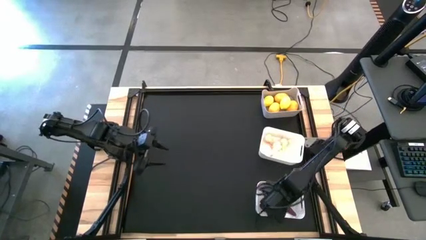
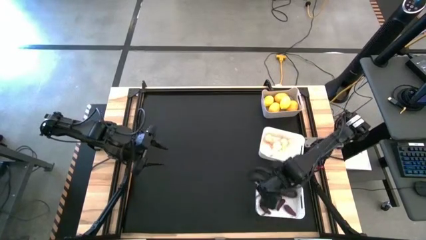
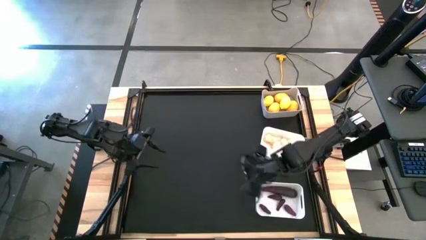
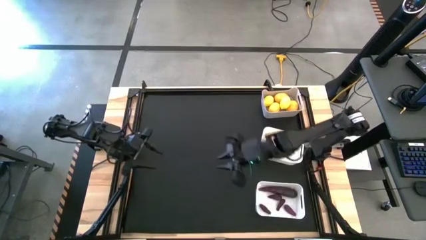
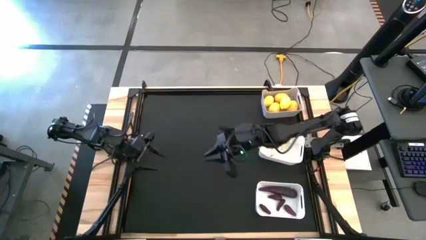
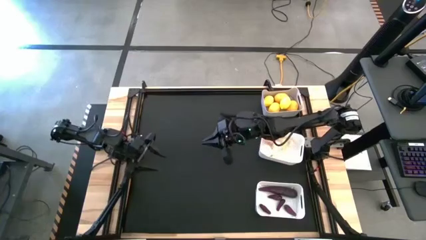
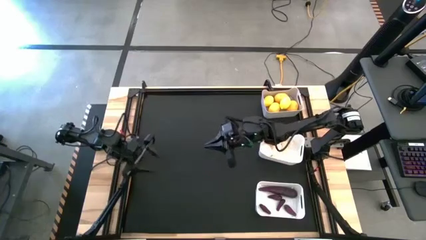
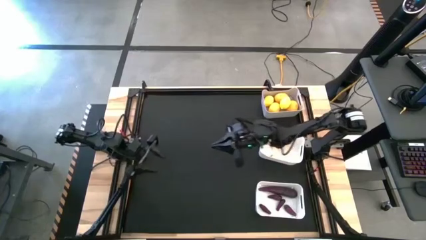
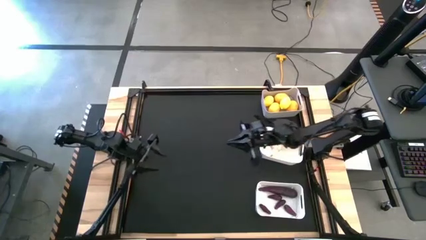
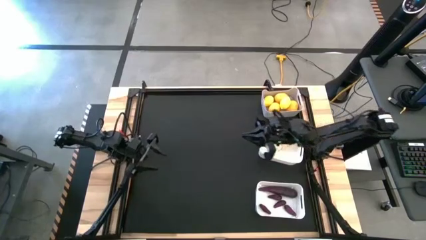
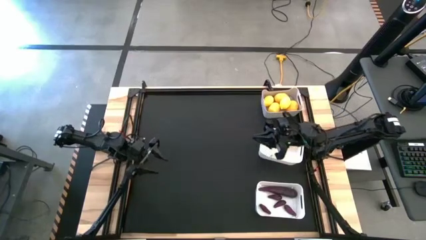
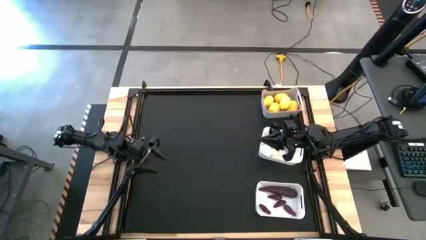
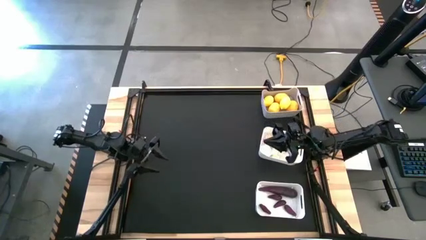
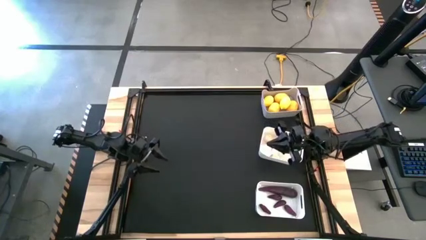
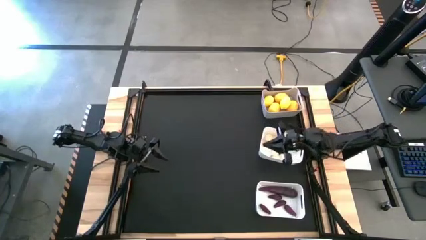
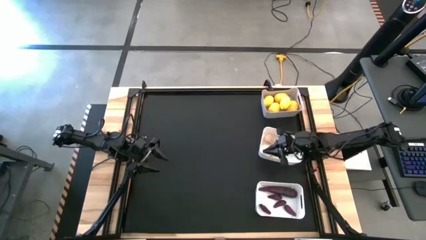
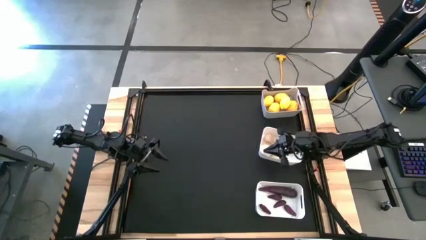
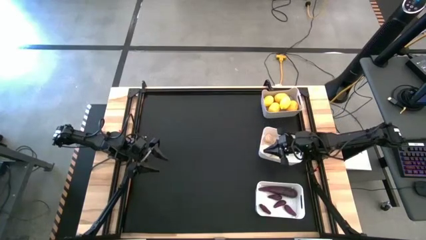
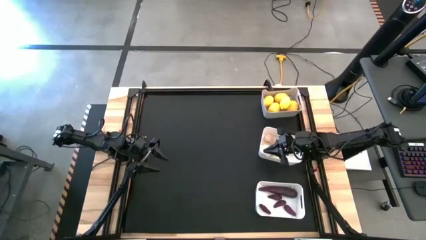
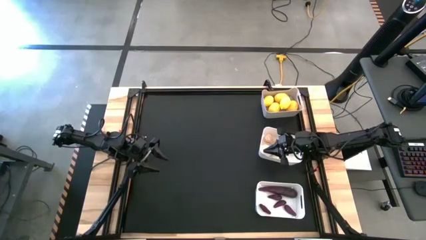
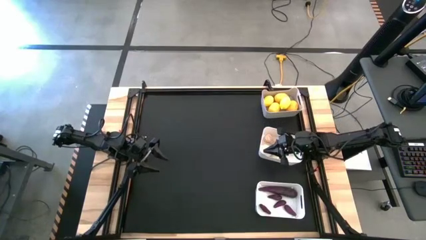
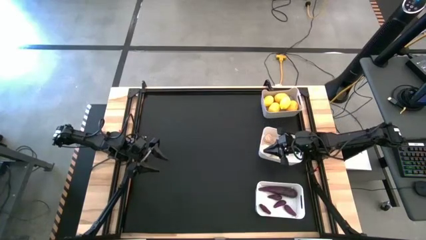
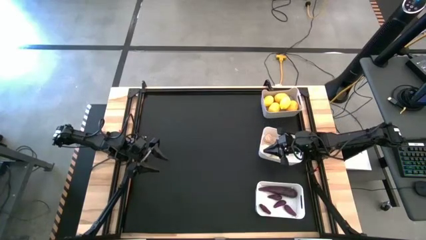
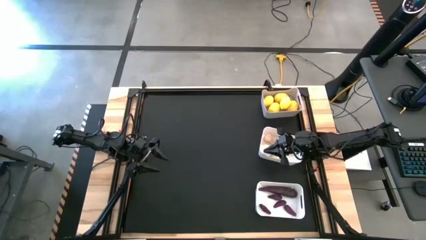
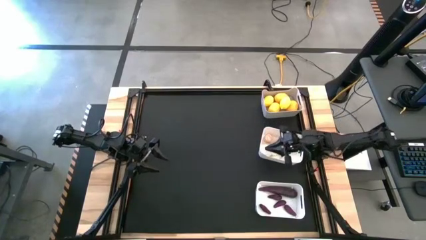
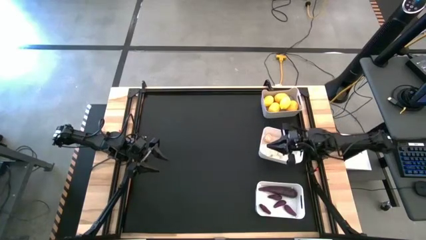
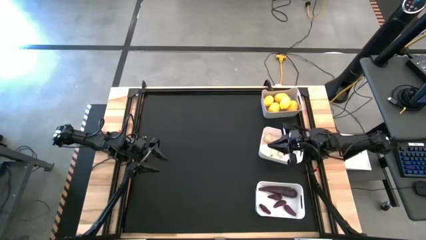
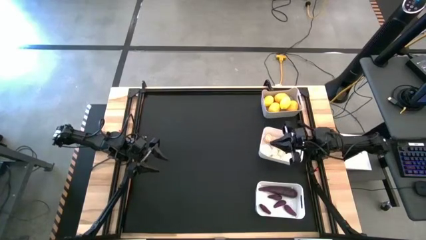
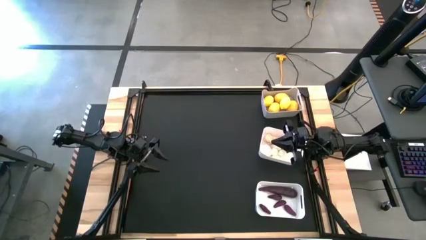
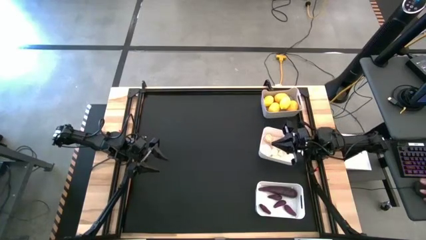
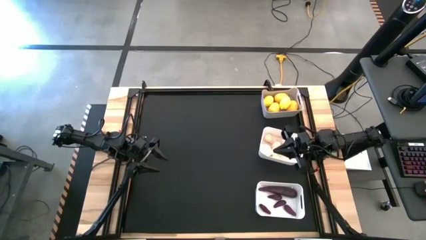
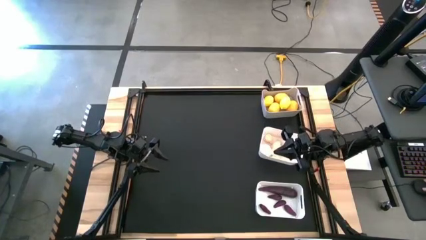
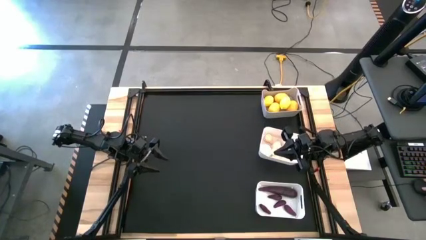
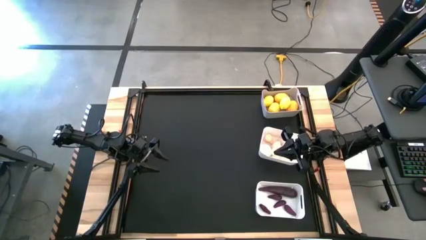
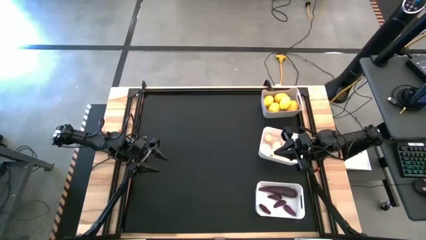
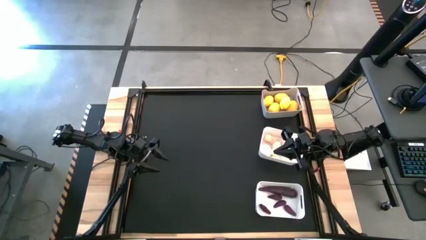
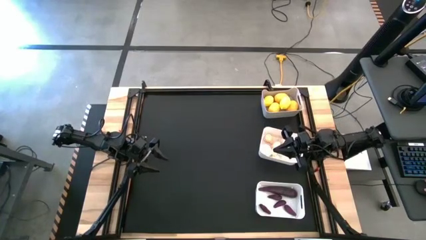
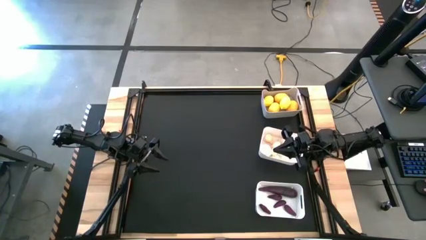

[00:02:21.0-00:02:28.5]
Task: Sort produce into baskets
Return to Home Position

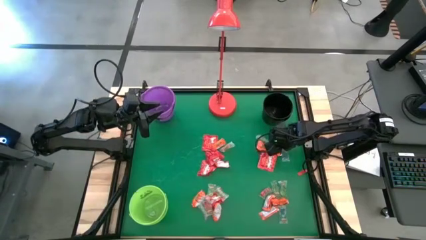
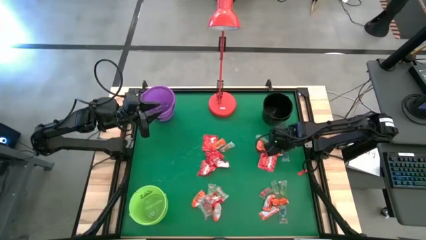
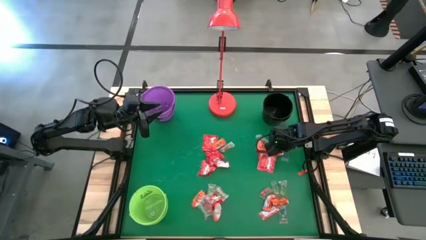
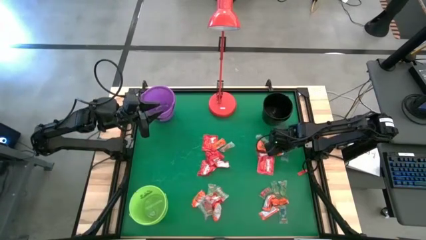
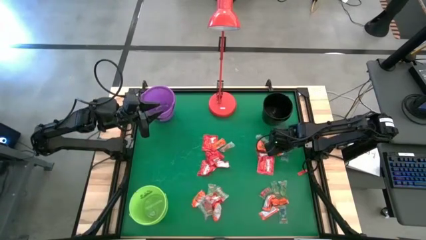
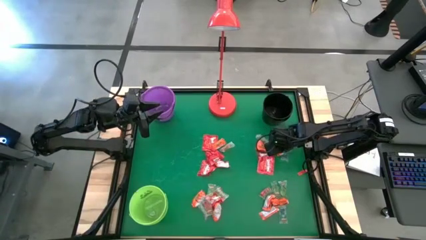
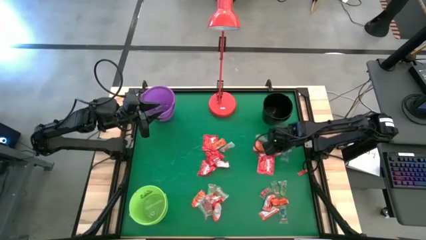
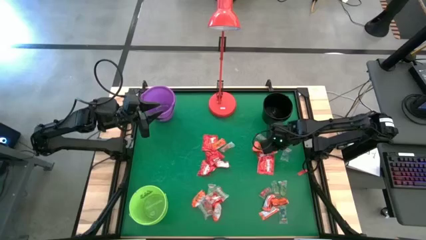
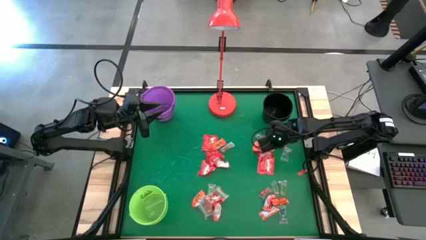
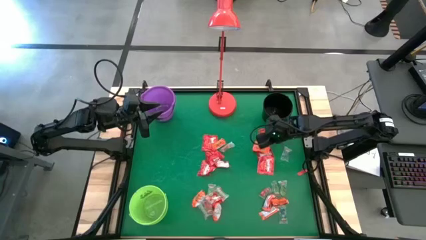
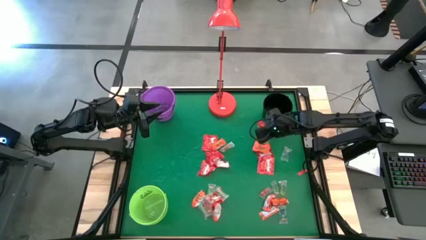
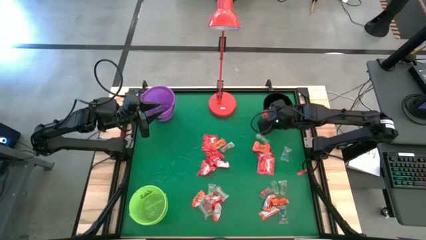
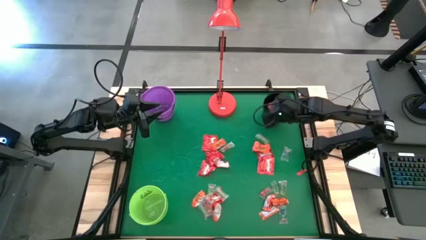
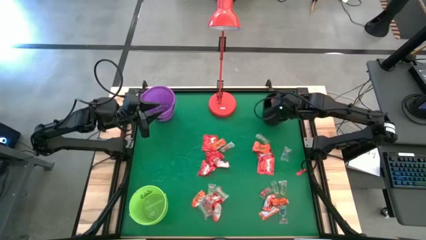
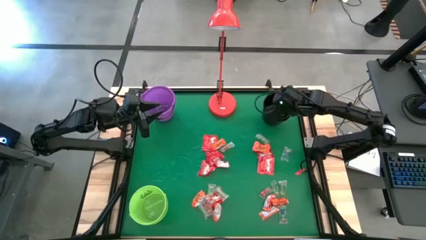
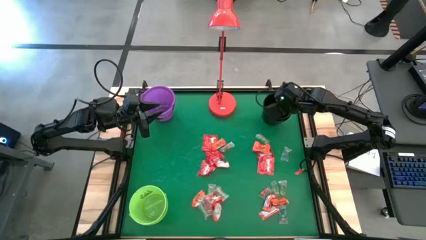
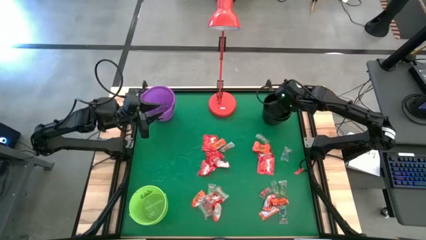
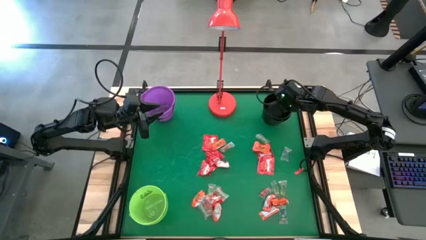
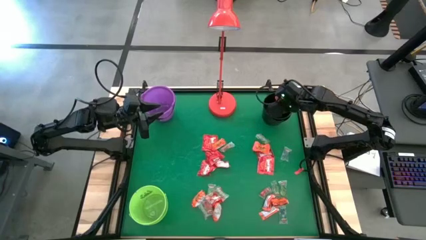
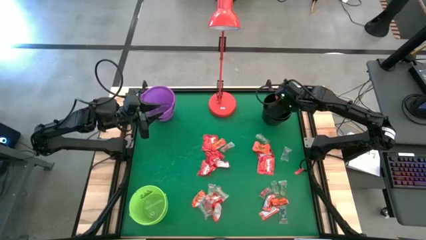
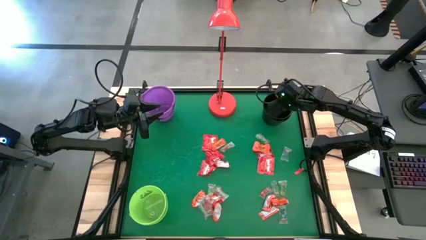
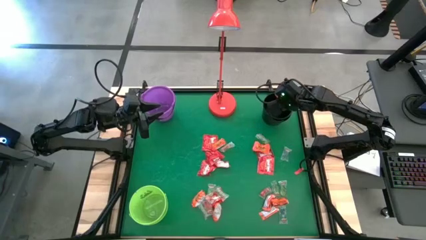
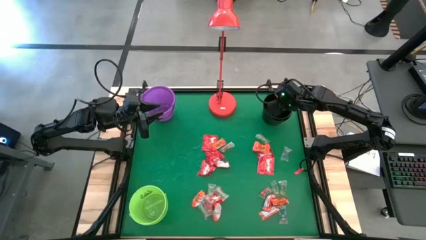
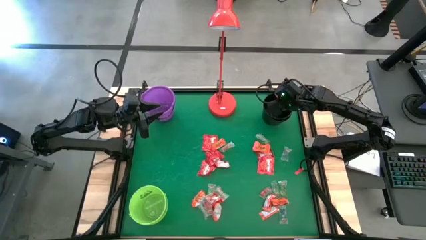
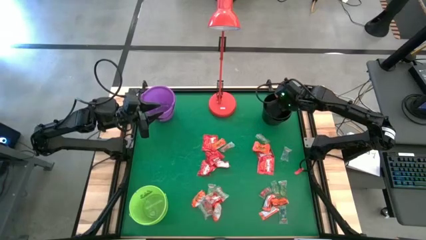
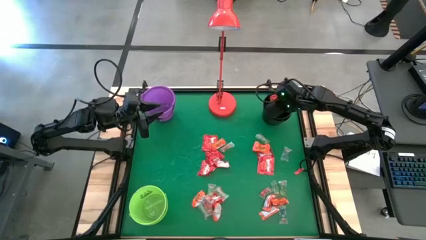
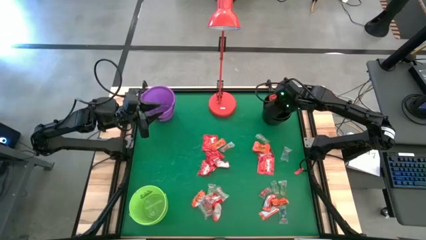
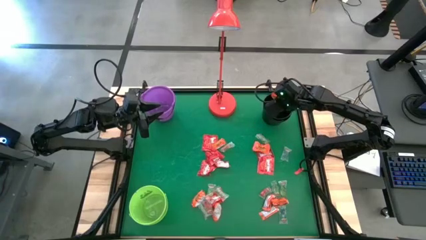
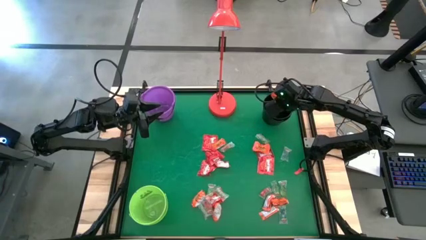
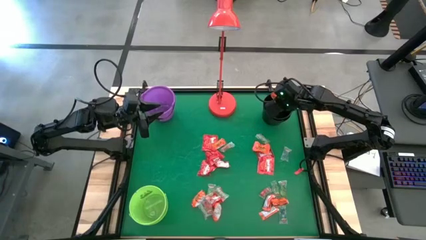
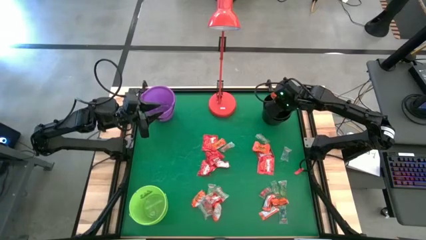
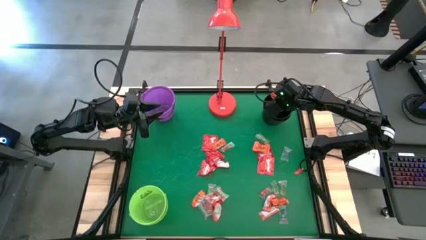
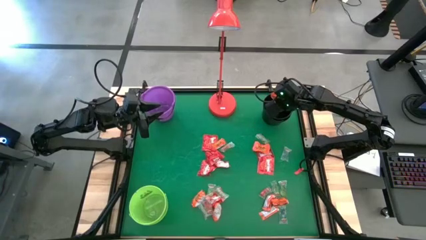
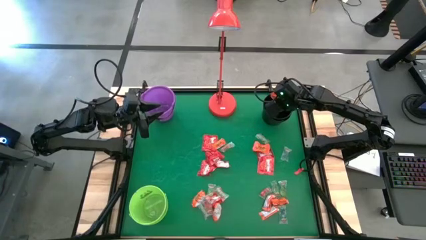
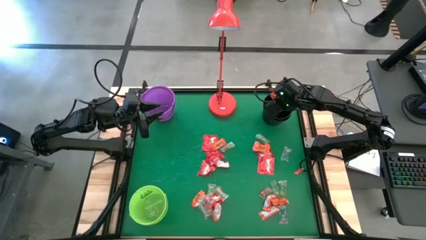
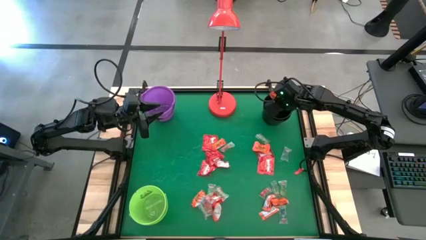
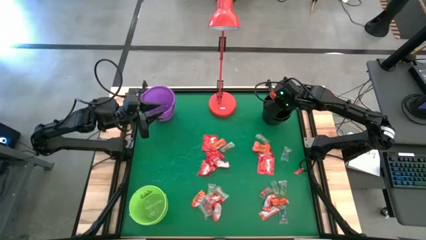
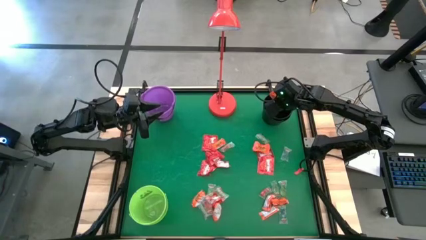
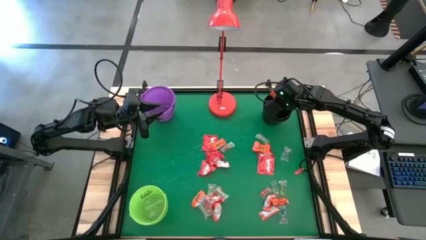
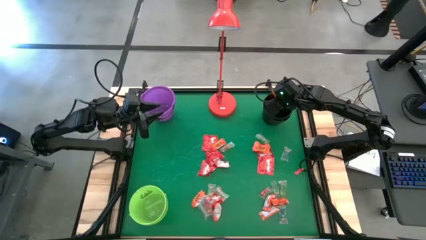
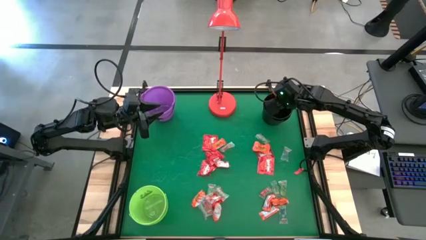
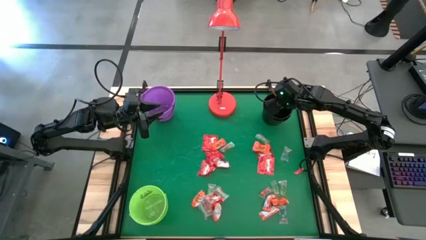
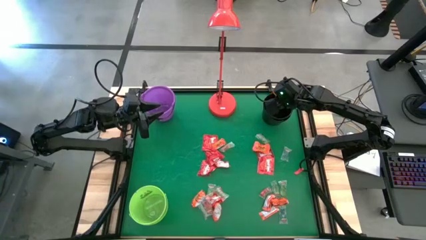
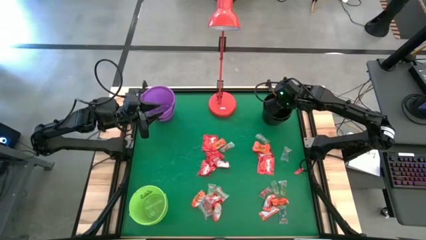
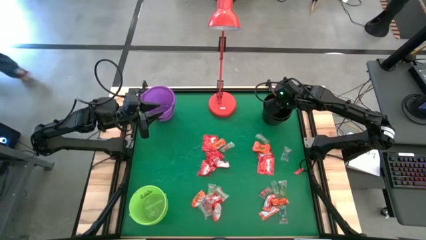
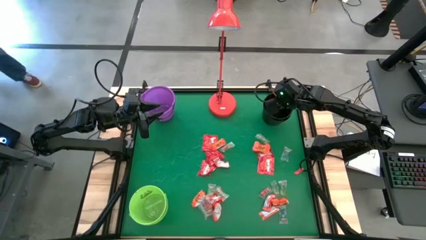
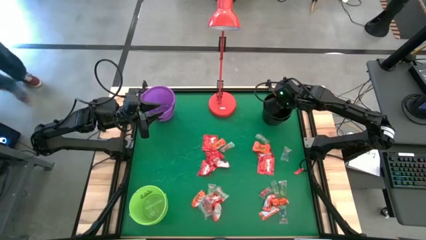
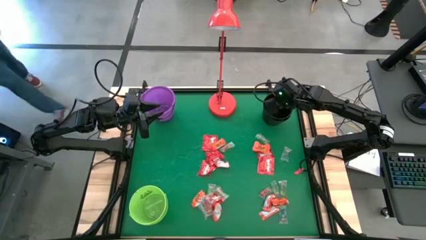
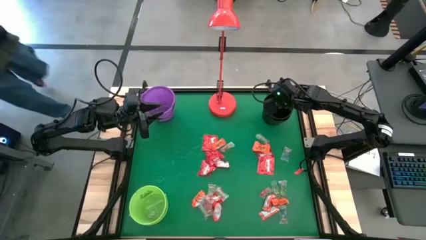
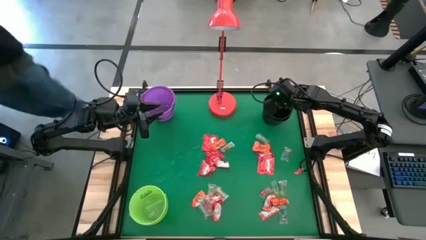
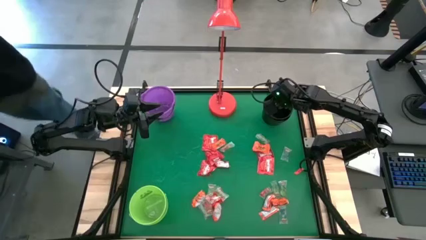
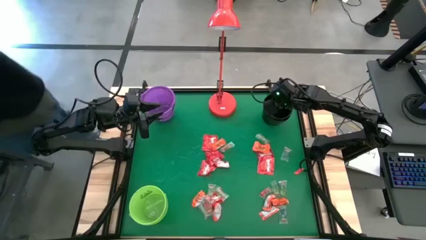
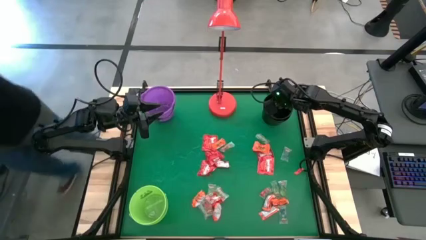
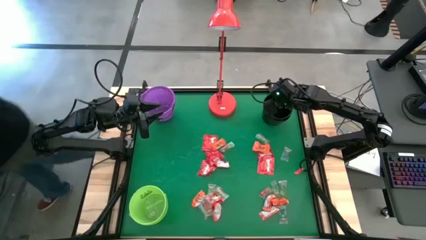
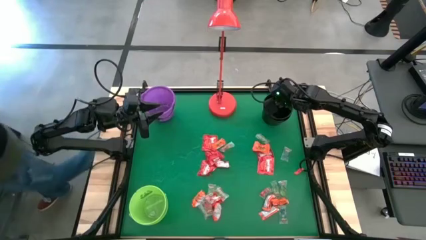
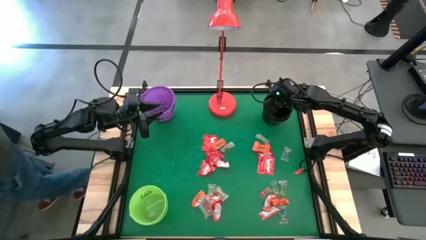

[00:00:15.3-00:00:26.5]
Task: Sort candy
Put the orange chocolate into the black bucket
